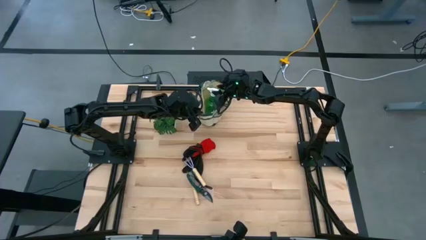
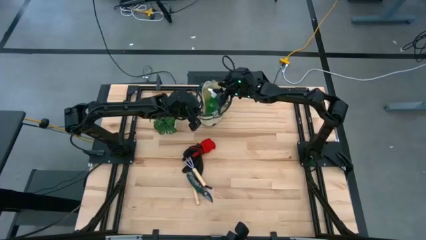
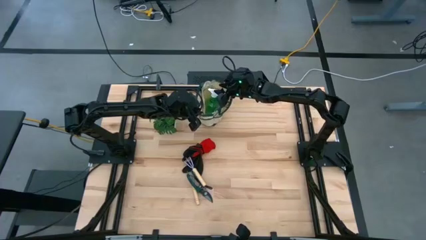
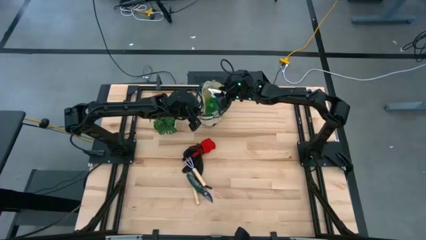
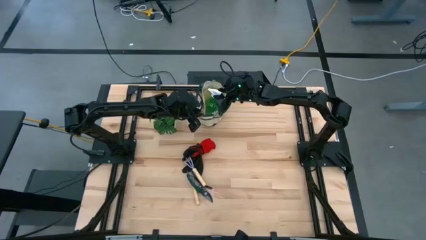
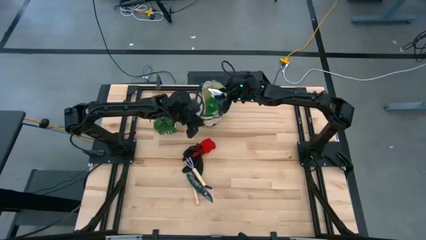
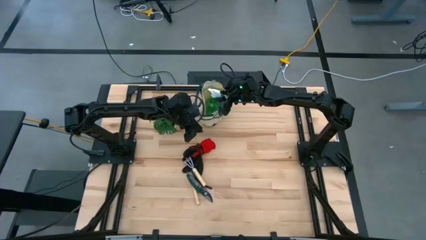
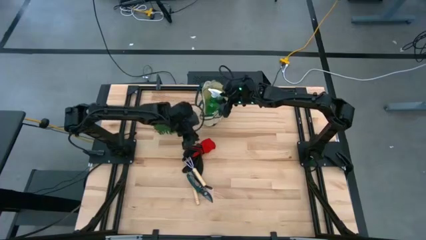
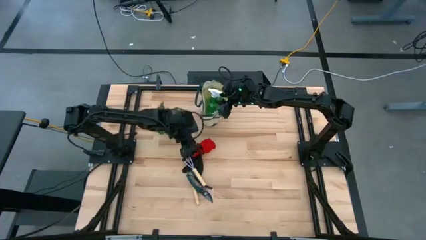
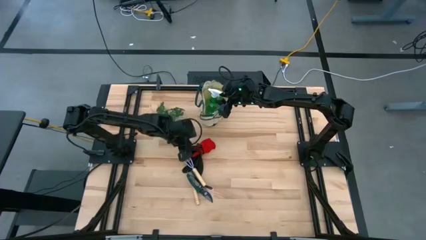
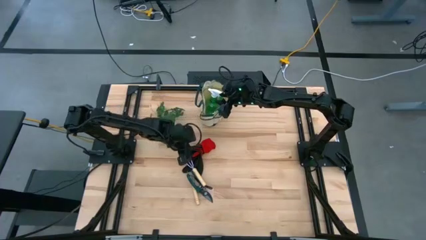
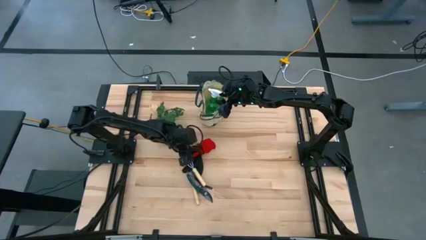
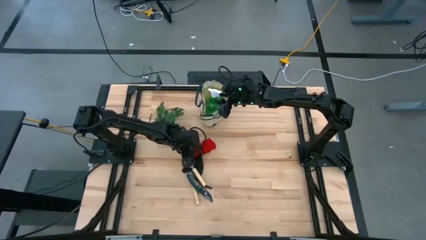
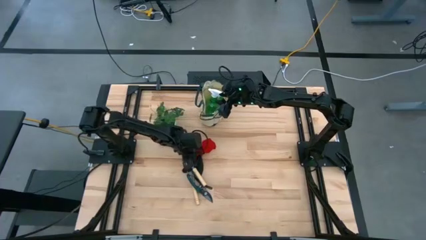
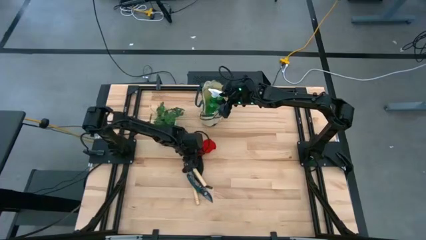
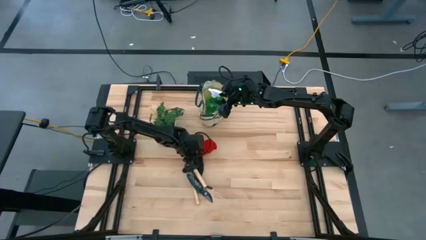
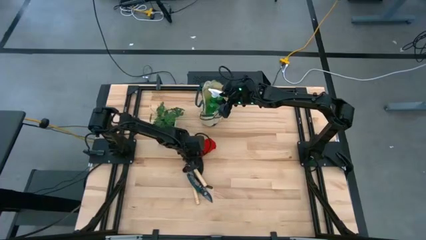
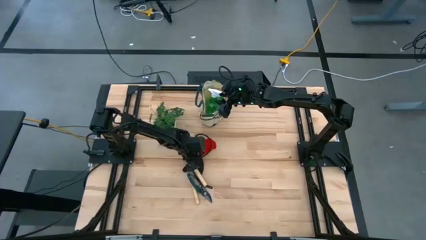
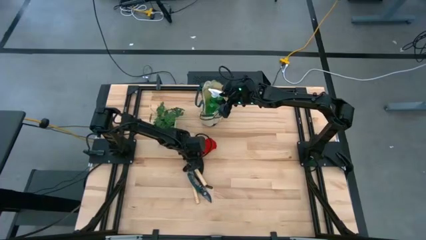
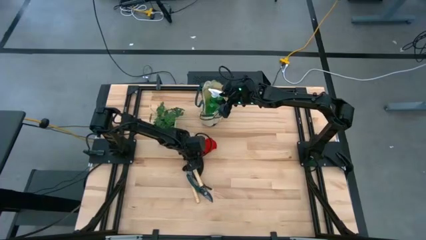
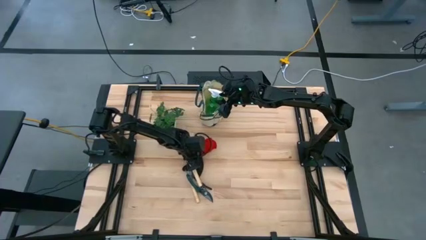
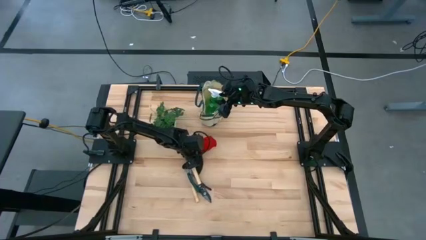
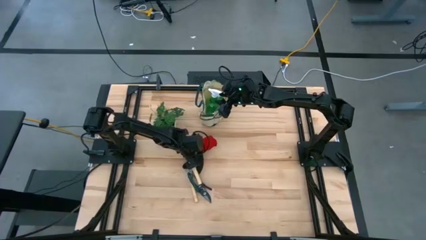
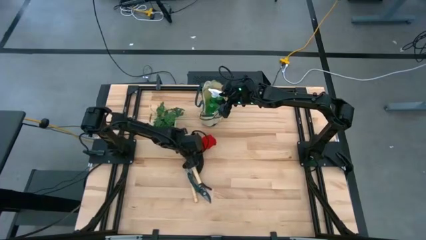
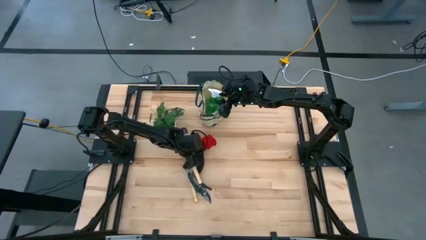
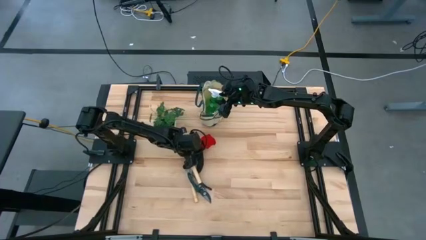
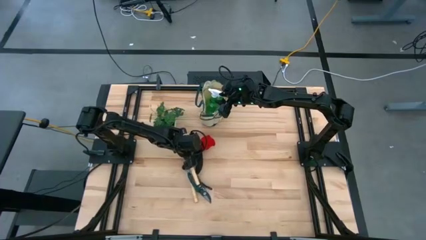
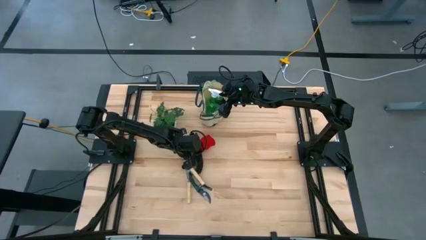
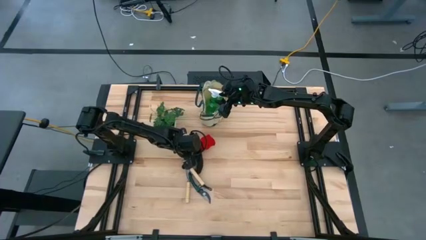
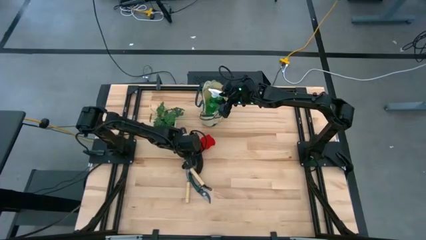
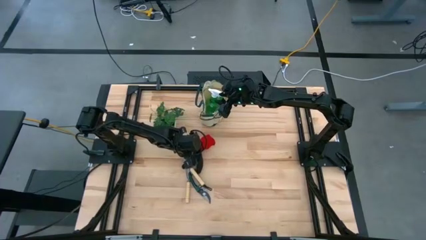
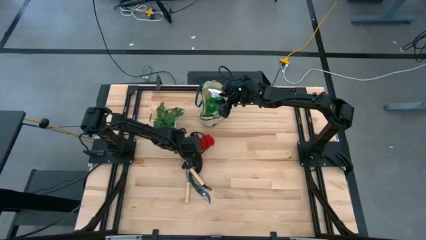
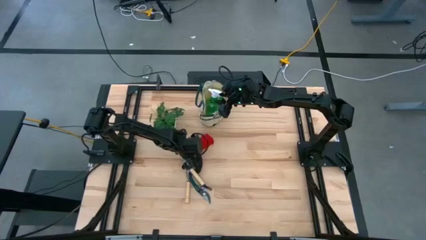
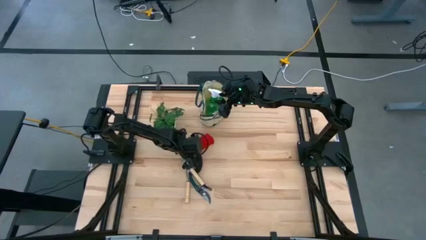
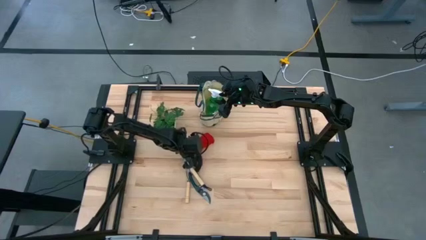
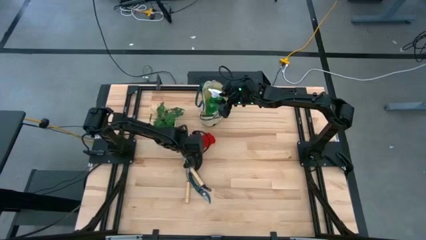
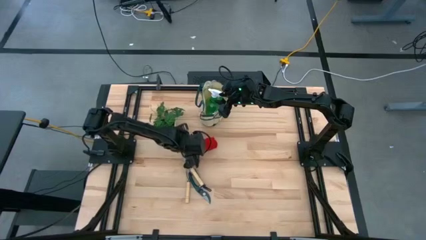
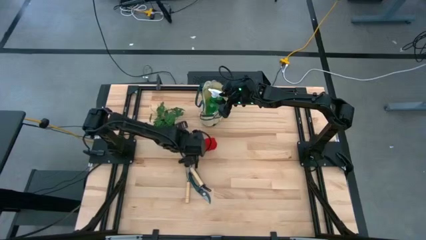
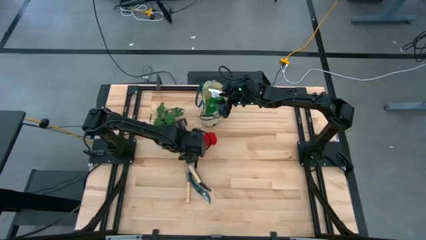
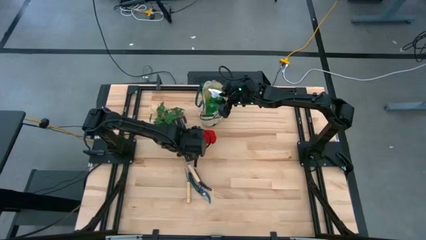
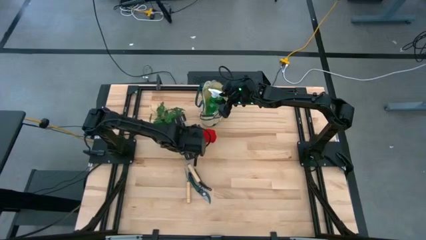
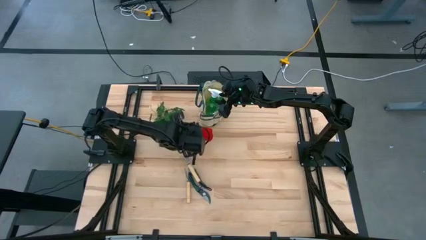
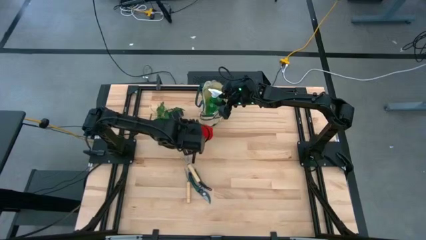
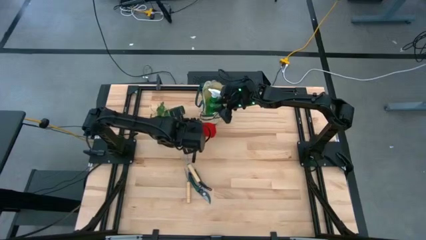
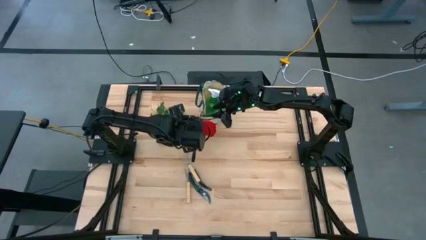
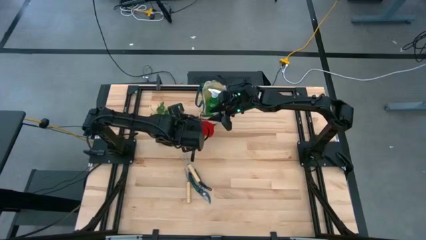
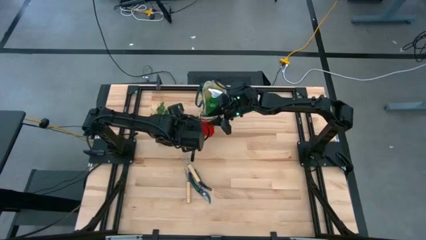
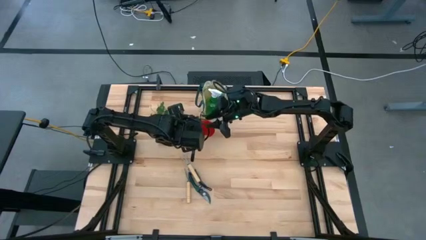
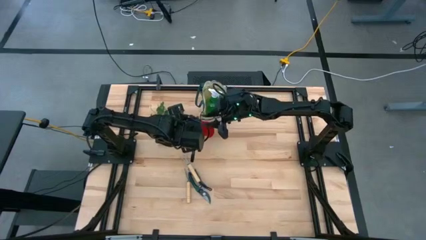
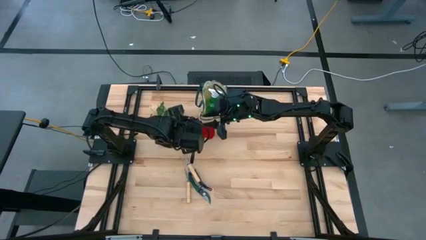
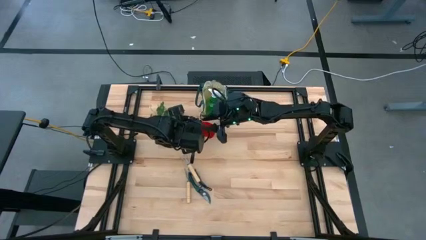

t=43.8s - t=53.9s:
Task: Pick & Place Garden tools in Gardening bag
Put the red gloves into the white gardening bag
